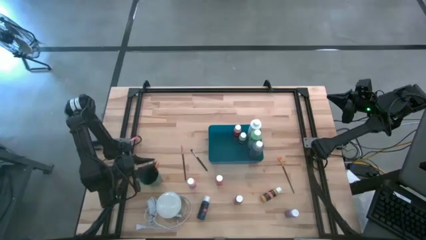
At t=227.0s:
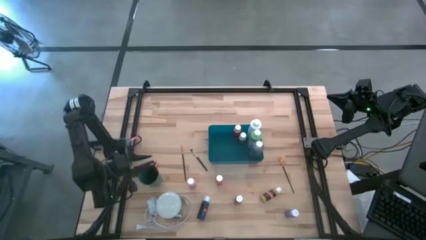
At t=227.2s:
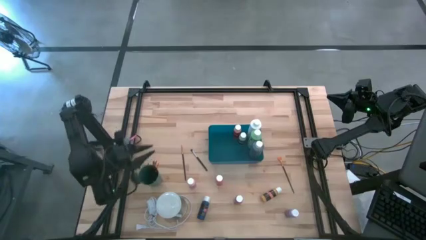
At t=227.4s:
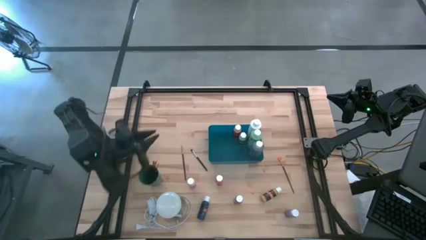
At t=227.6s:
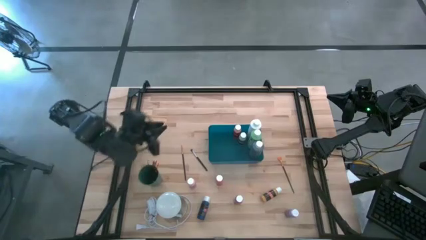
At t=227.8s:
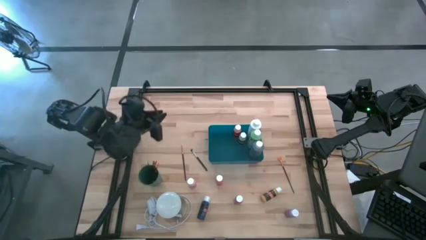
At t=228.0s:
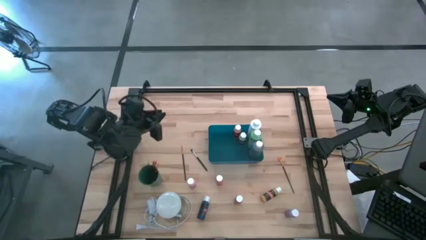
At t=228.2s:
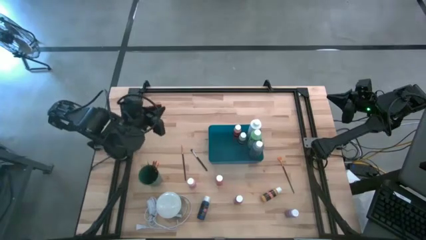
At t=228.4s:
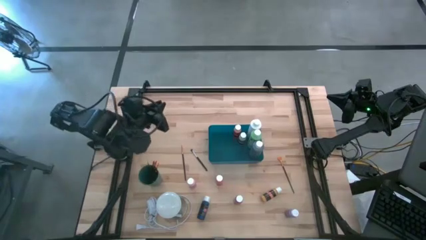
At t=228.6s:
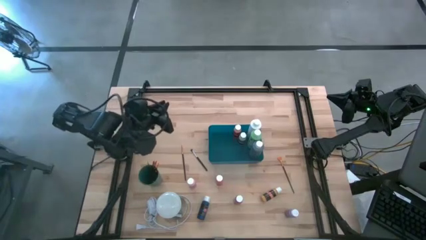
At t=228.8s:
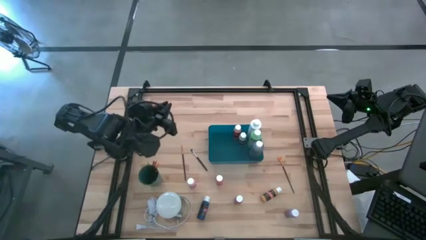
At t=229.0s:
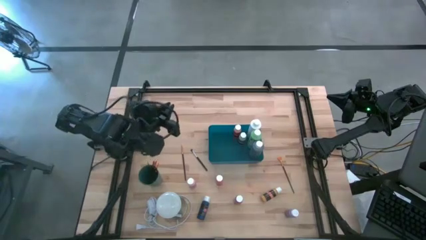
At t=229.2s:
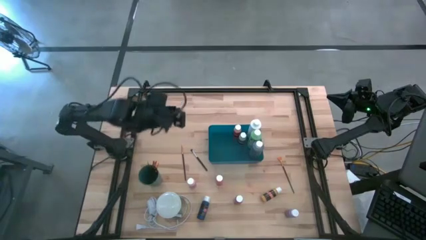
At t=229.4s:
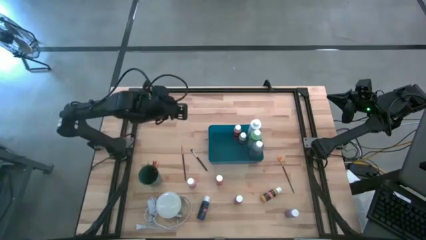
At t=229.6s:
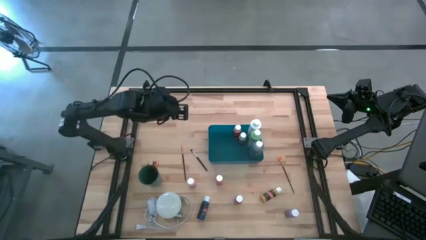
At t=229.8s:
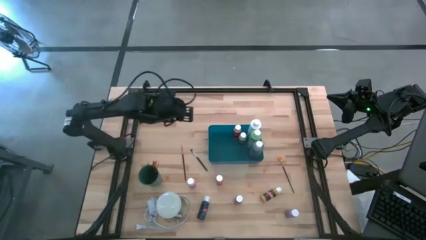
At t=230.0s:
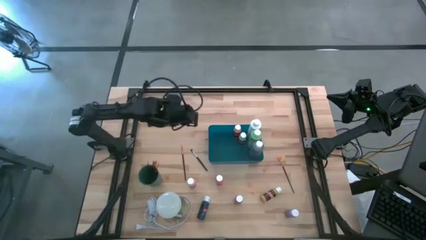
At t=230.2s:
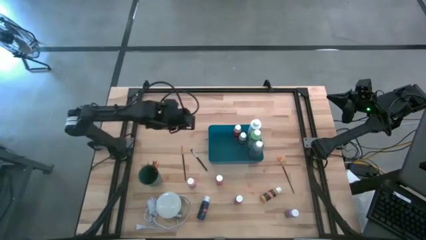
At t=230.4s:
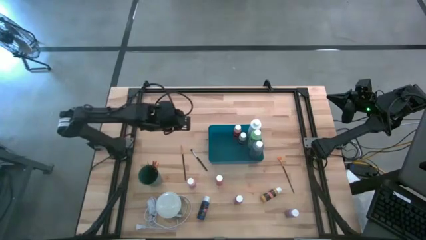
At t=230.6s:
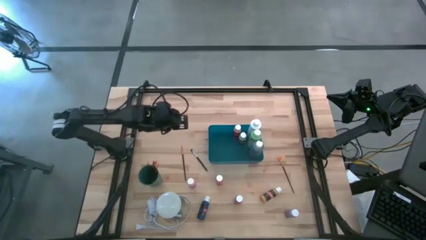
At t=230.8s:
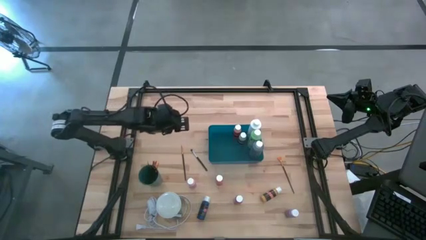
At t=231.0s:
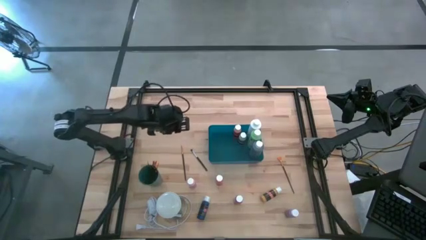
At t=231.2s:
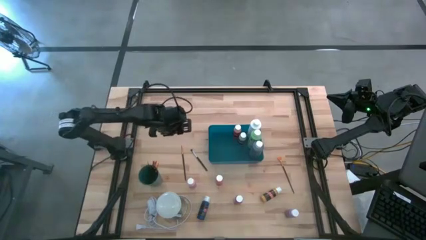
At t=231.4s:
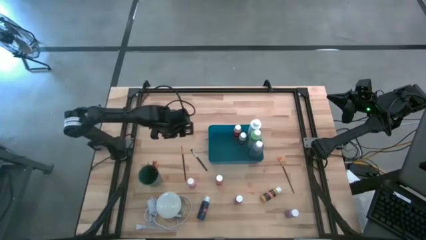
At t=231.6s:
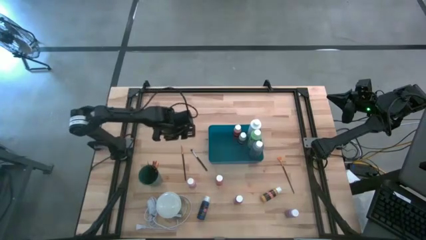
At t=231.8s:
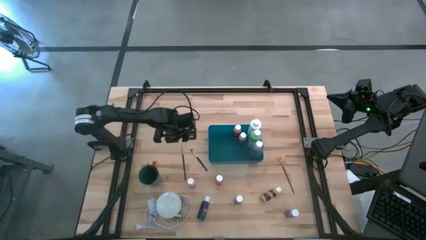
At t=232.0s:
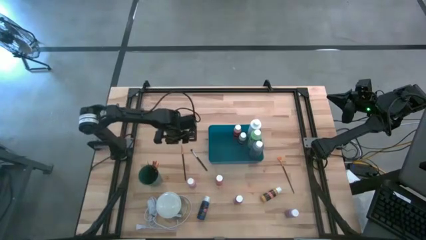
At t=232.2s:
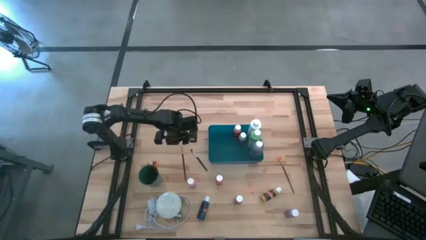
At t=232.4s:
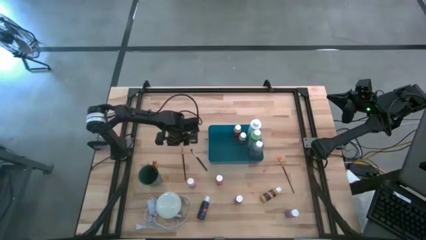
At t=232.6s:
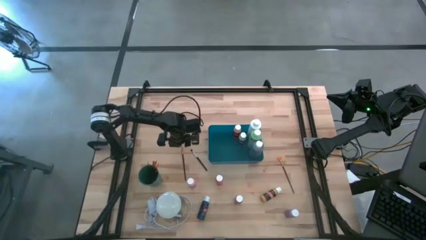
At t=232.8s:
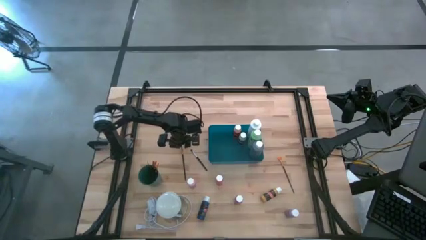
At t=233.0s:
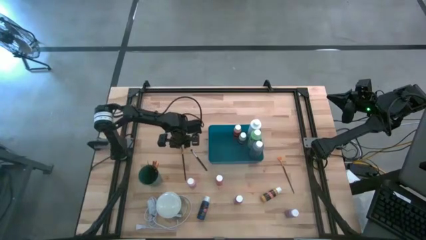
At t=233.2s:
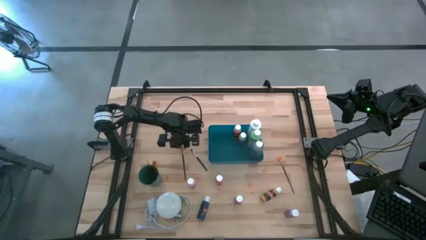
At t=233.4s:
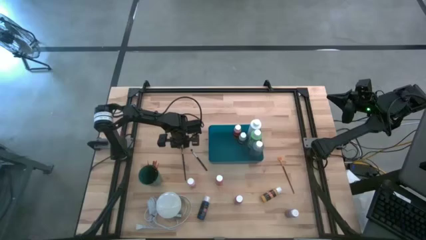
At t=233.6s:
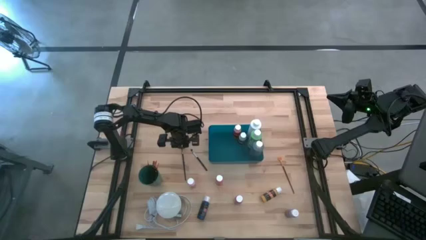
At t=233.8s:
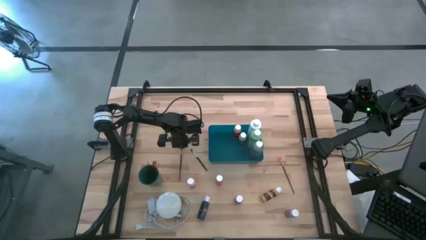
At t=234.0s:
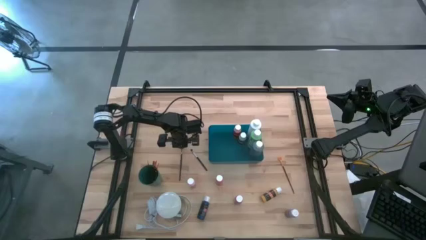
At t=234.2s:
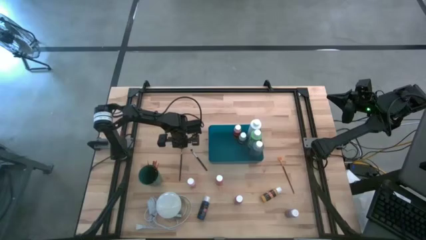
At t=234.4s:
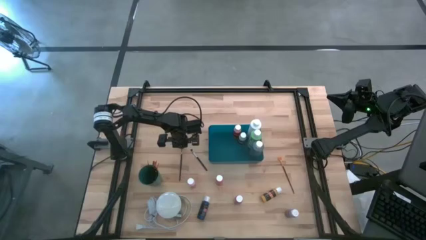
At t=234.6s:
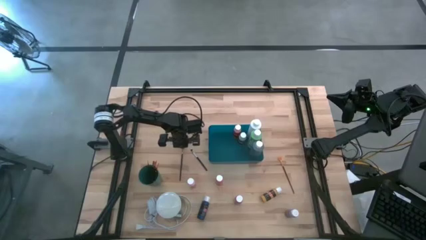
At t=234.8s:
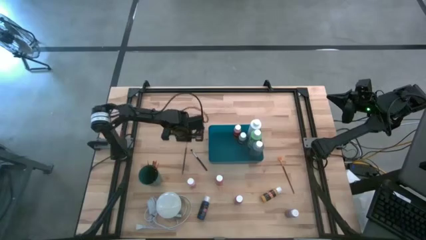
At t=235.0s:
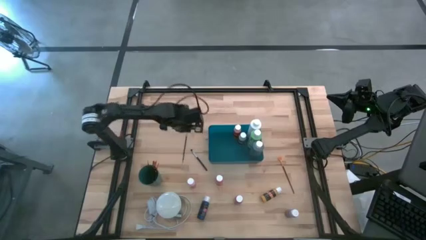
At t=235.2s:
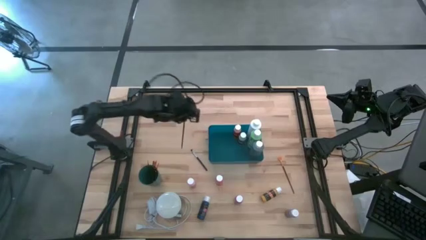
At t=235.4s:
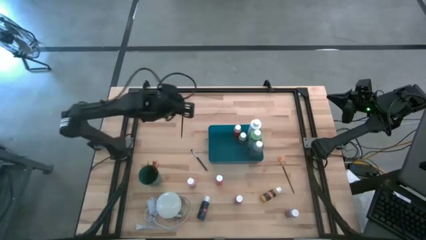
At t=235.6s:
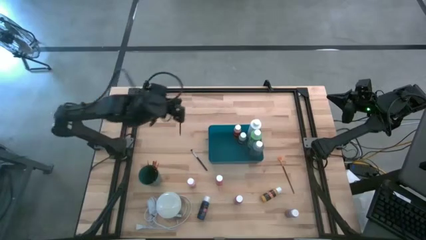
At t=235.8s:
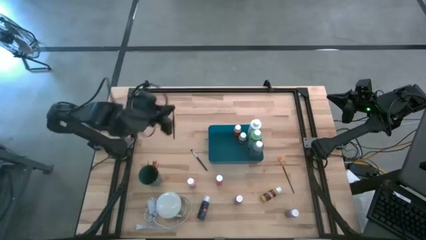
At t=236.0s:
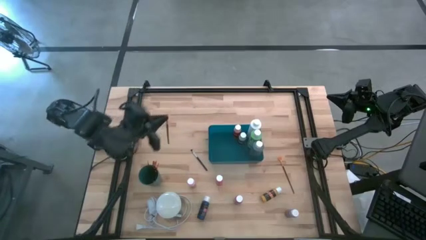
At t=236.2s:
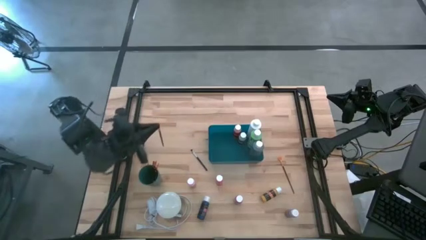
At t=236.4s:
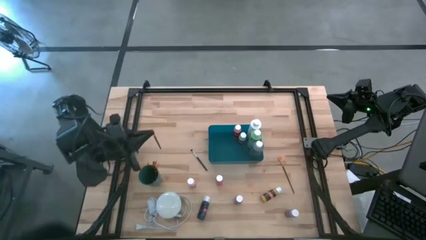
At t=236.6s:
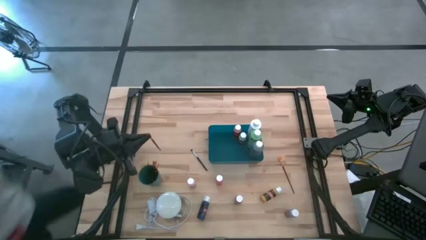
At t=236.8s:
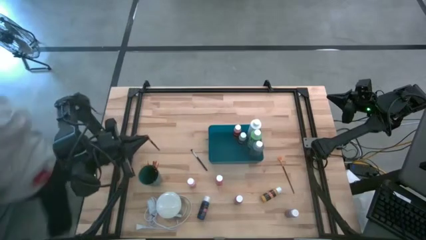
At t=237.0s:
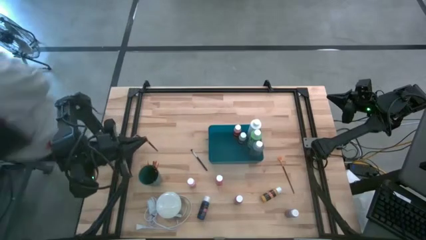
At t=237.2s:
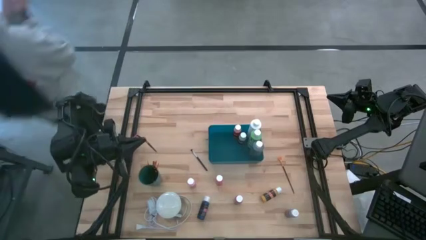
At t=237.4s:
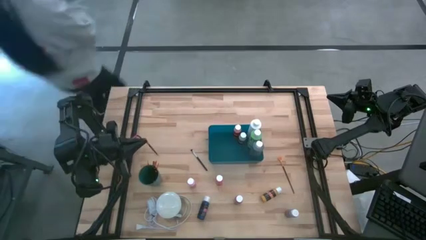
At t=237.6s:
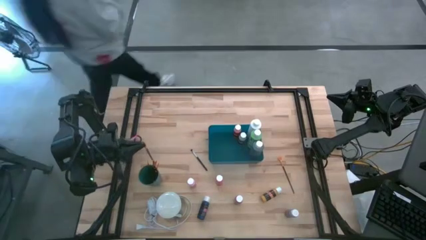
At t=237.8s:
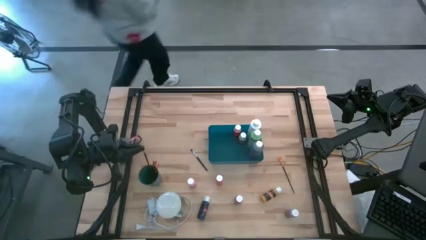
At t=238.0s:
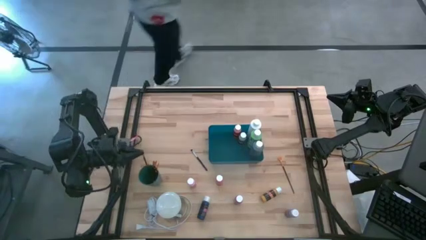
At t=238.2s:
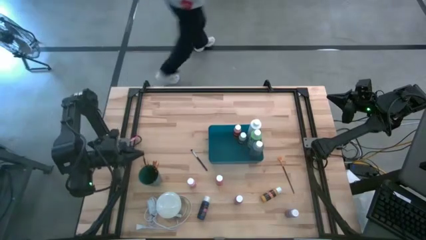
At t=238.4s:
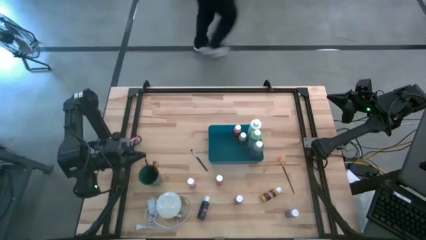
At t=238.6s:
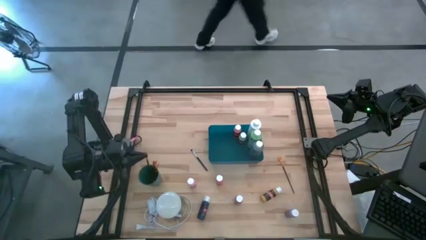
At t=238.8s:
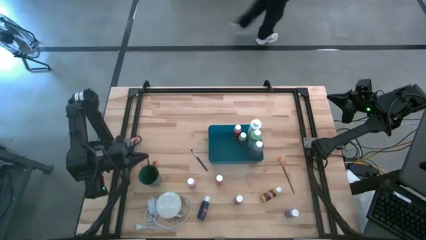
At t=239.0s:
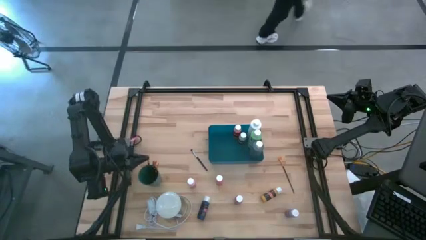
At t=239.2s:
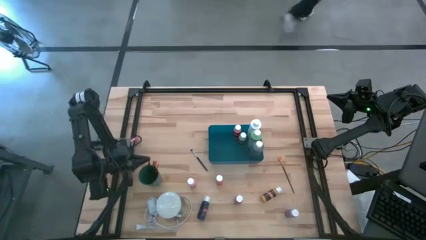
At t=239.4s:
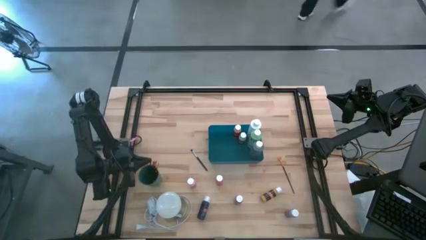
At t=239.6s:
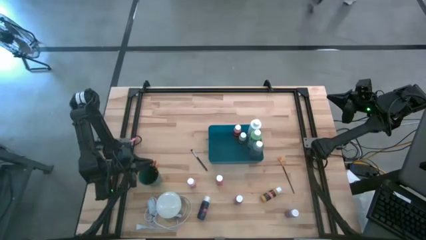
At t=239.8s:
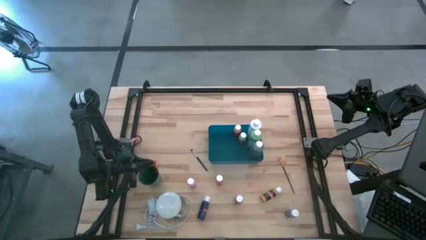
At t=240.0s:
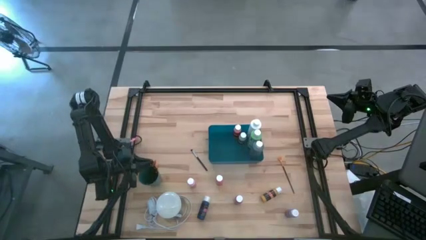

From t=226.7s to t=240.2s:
Task: Pick & Place Paint Supplies
Put the gold paintbrush into the green cup

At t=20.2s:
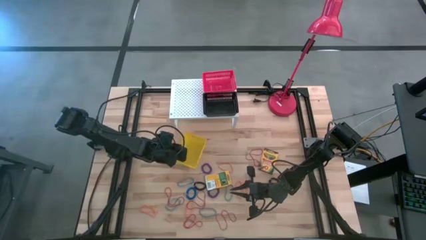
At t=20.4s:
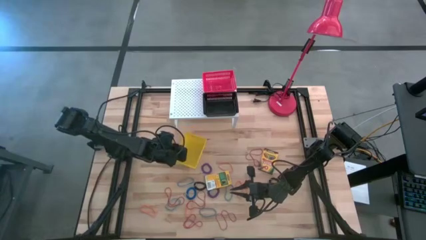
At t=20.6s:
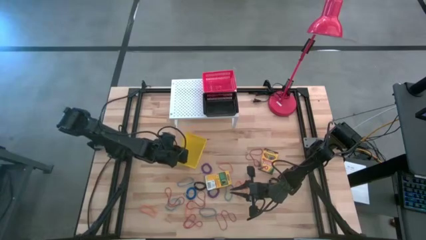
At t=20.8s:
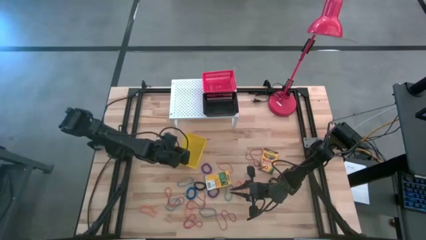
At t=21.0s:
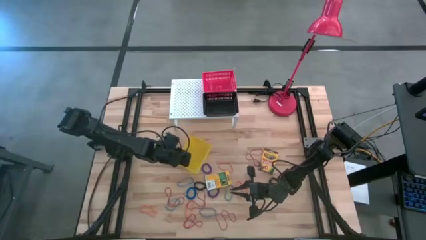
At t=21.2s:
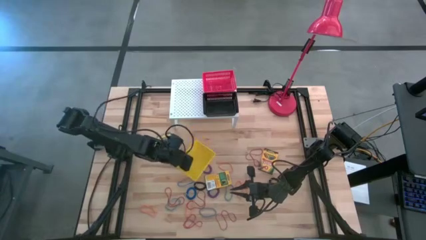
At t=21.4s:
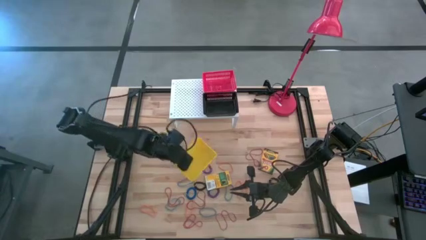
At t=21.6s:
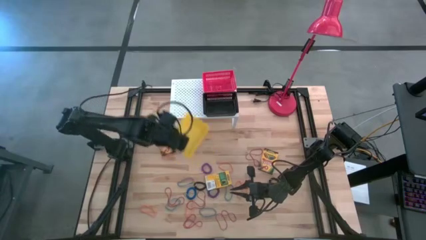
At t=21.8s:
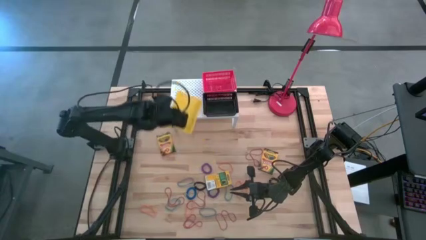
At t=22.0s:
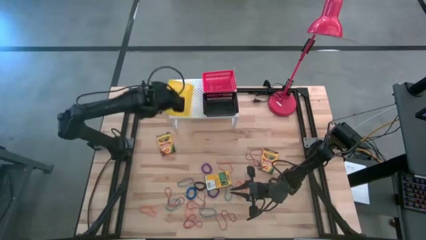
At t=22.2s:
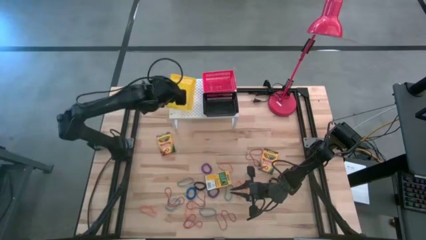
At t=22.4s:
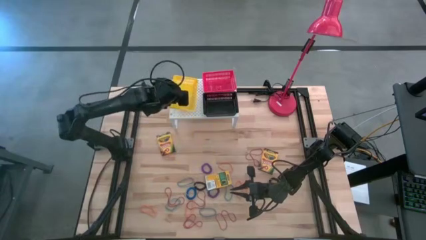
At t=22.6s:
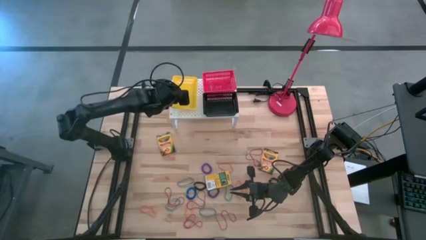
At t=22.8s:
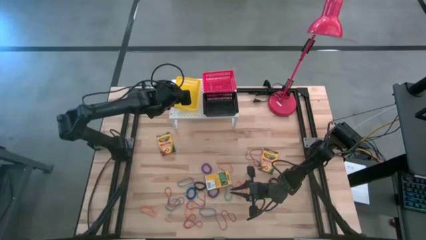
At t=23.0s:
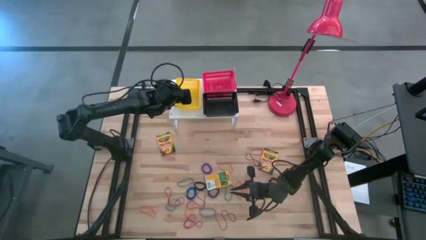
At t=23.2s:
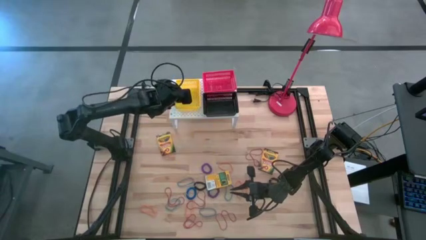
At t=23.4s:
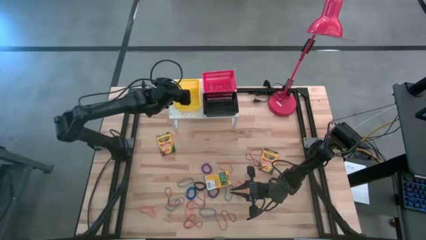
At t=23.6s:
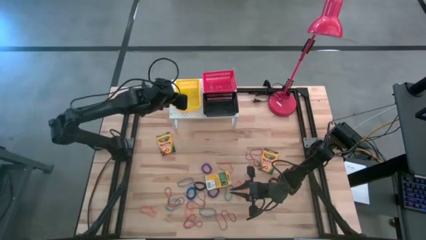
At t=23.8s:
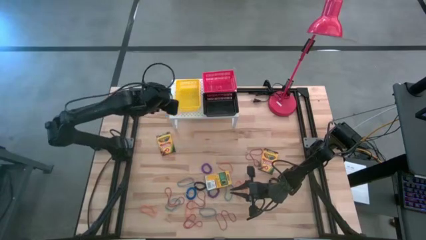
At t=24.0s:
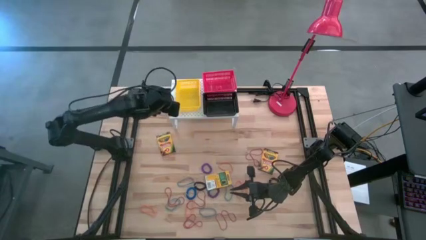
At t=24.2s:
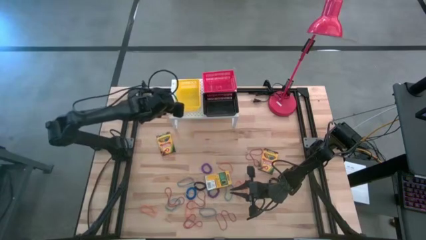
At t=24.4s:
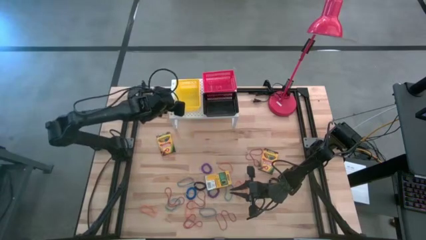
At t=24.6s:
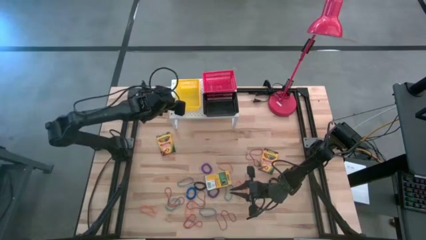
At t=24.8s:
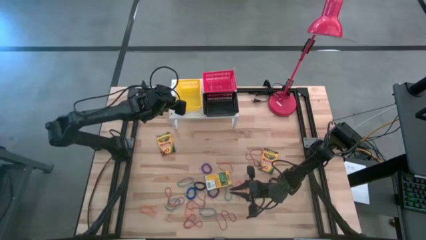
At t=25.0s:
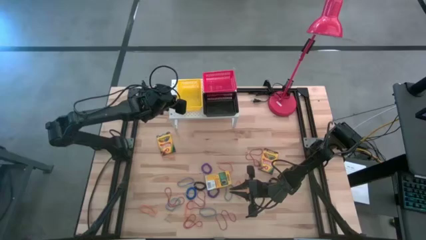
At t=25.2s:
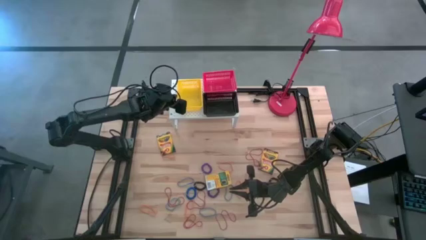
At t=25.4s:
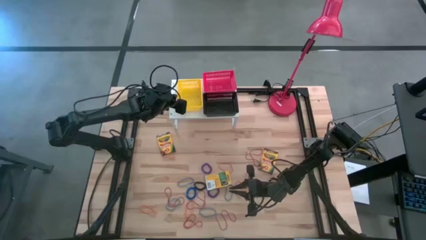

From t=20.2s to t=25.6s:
Task: Pick & Place Office Desk Supplies
Put the yellow bin on the shelf
